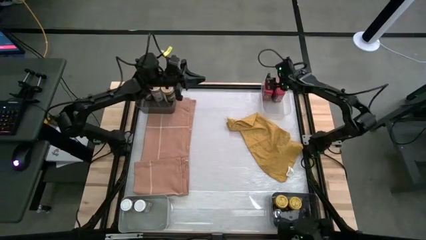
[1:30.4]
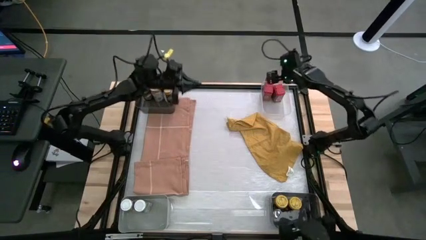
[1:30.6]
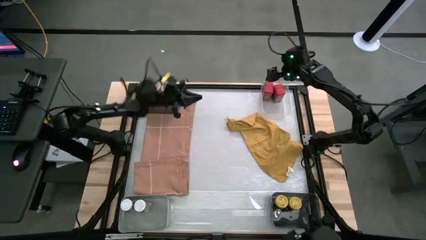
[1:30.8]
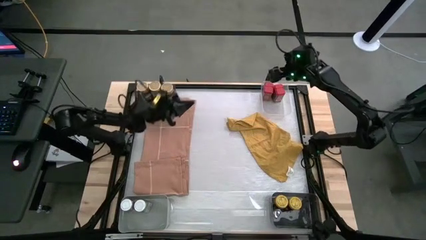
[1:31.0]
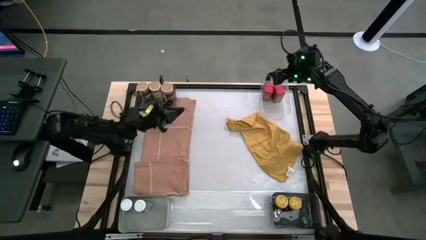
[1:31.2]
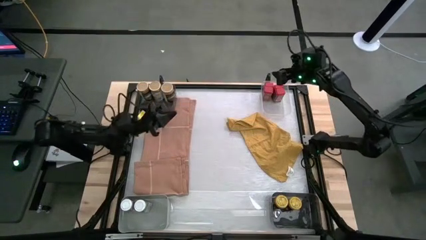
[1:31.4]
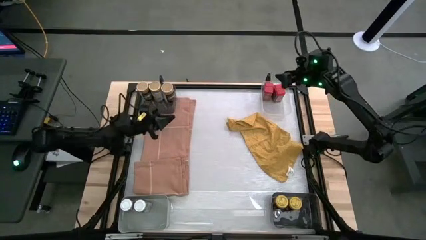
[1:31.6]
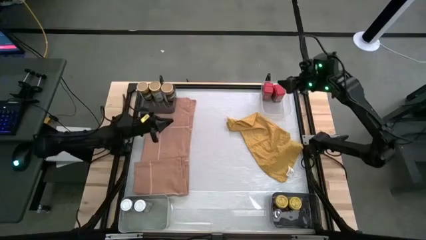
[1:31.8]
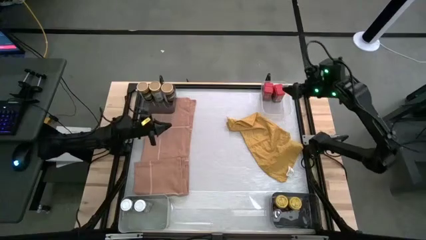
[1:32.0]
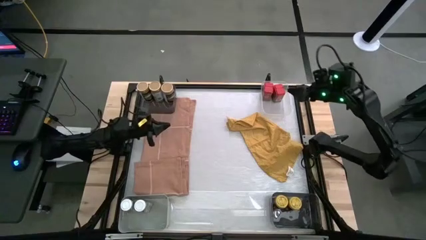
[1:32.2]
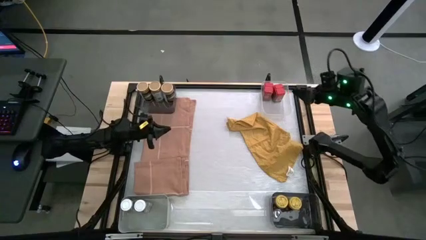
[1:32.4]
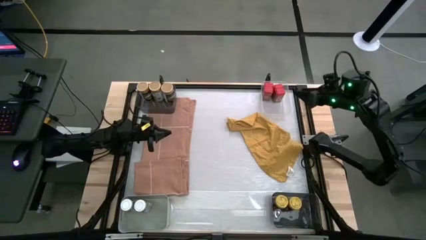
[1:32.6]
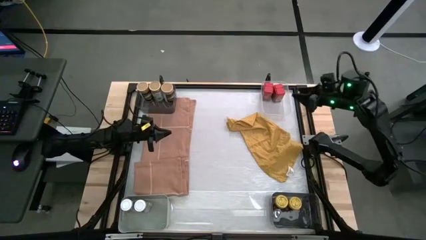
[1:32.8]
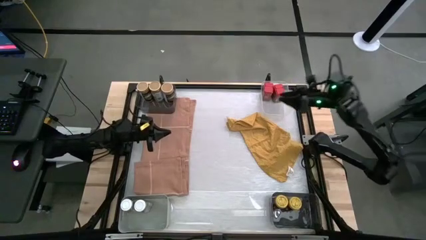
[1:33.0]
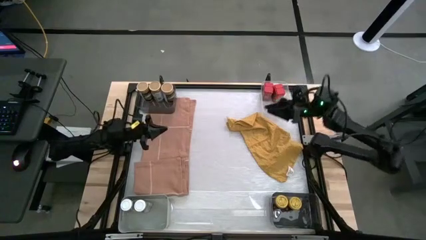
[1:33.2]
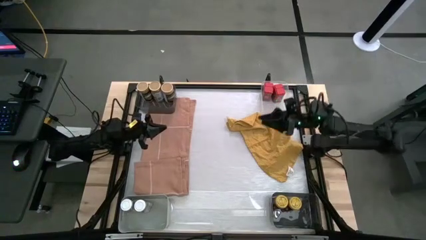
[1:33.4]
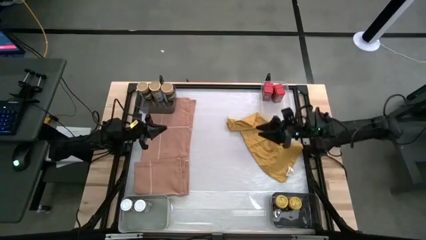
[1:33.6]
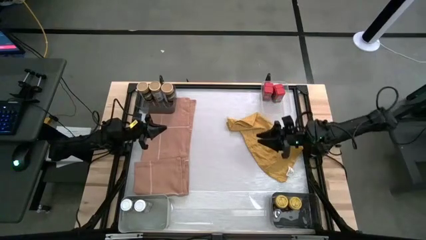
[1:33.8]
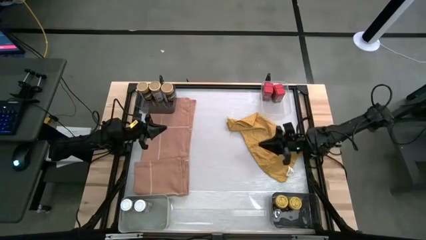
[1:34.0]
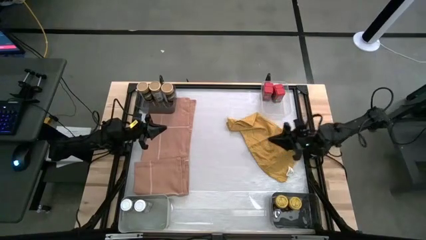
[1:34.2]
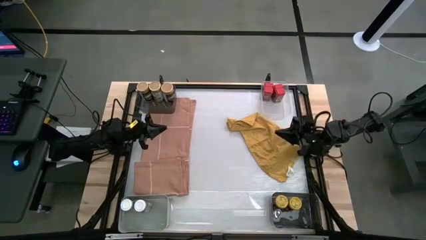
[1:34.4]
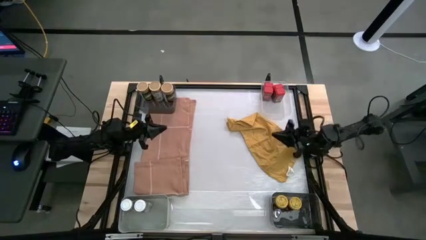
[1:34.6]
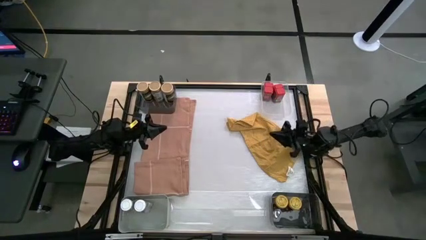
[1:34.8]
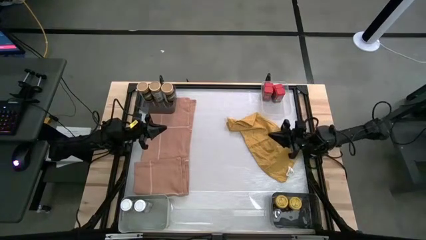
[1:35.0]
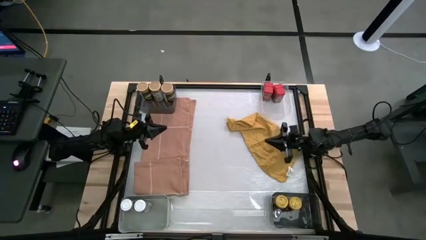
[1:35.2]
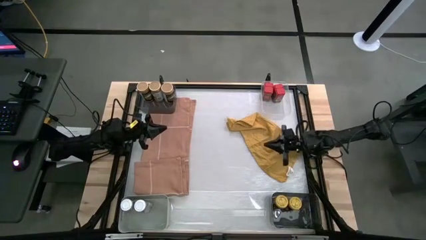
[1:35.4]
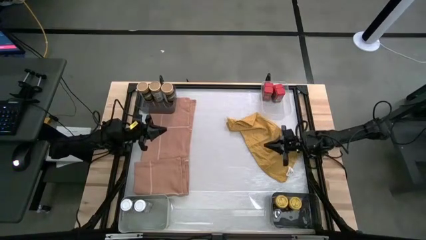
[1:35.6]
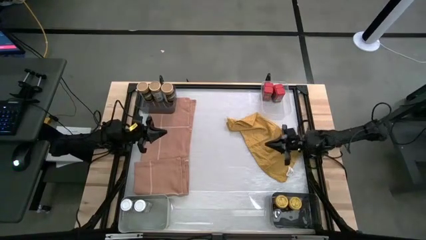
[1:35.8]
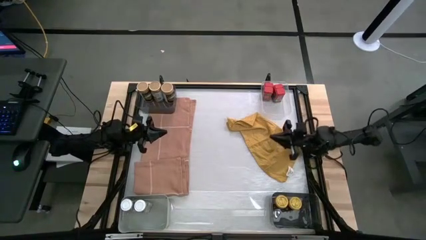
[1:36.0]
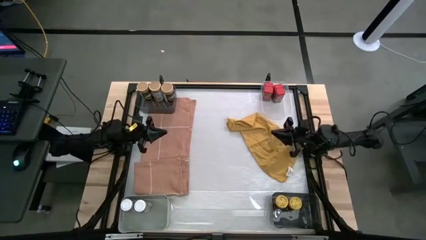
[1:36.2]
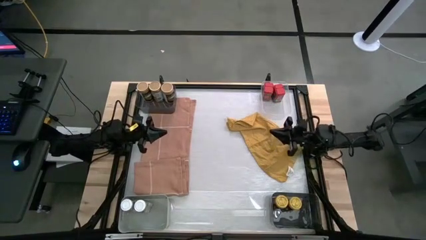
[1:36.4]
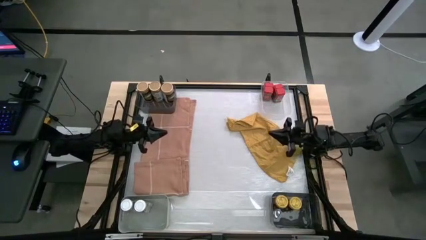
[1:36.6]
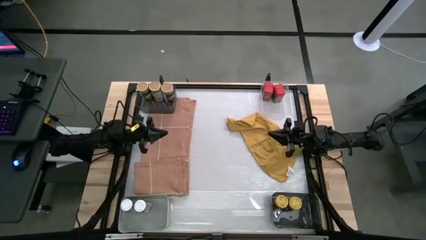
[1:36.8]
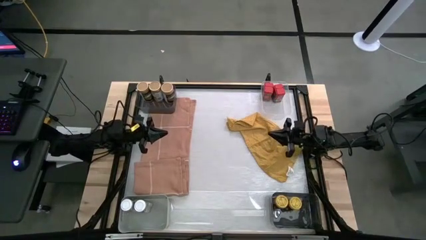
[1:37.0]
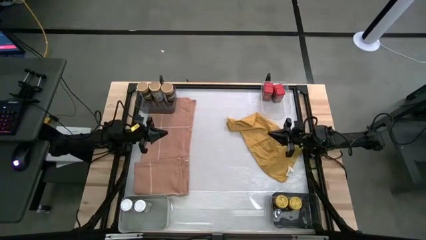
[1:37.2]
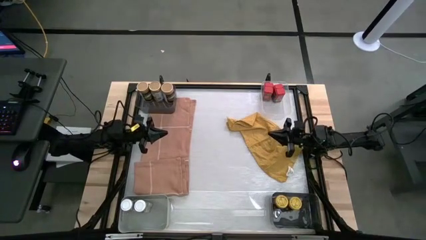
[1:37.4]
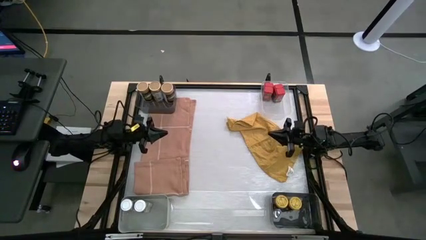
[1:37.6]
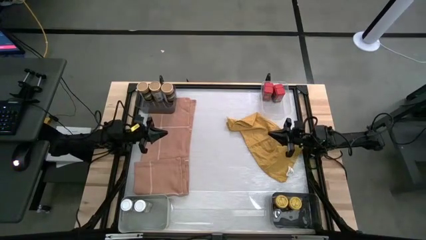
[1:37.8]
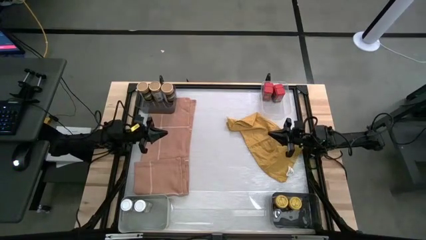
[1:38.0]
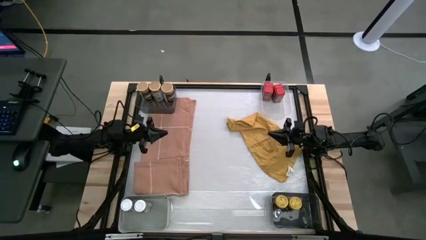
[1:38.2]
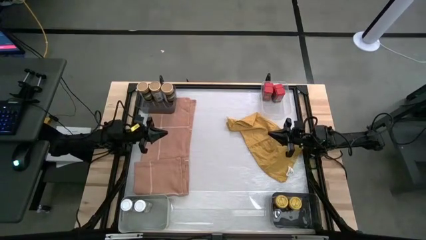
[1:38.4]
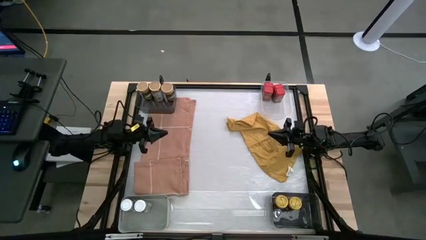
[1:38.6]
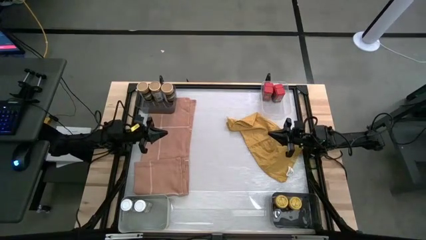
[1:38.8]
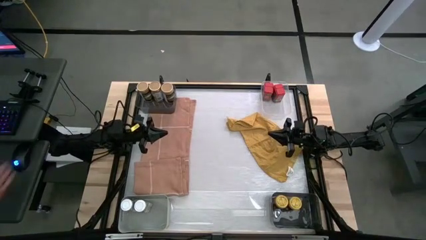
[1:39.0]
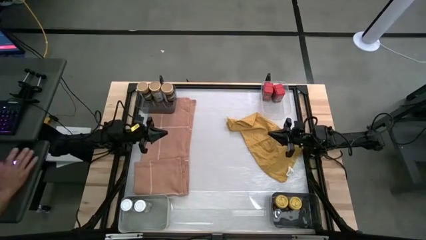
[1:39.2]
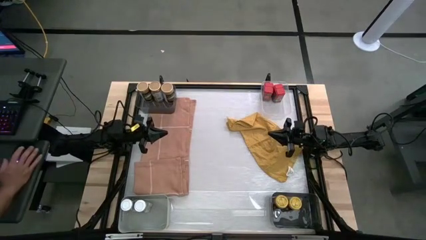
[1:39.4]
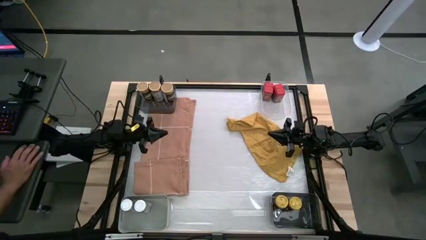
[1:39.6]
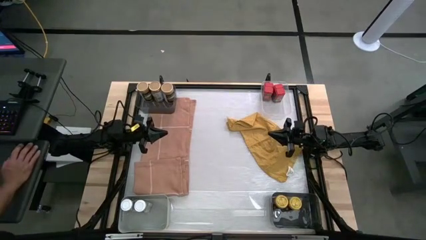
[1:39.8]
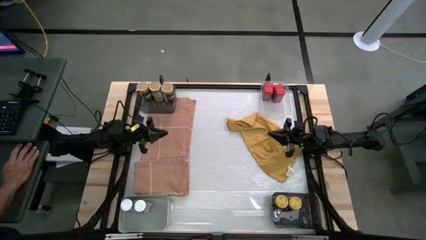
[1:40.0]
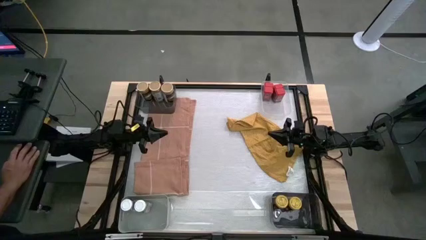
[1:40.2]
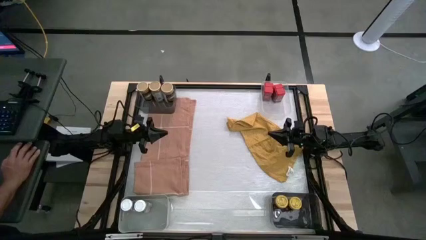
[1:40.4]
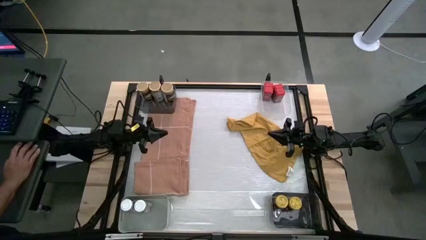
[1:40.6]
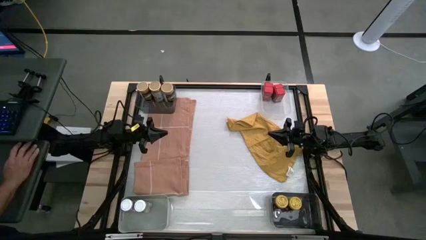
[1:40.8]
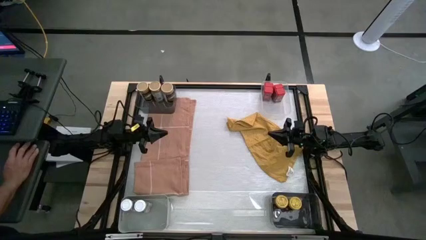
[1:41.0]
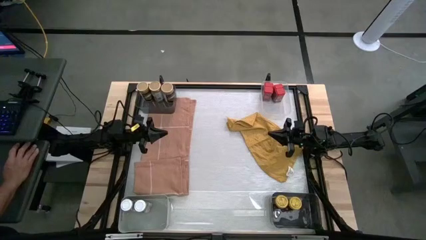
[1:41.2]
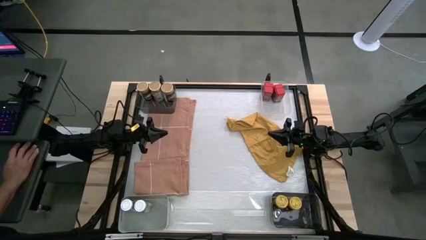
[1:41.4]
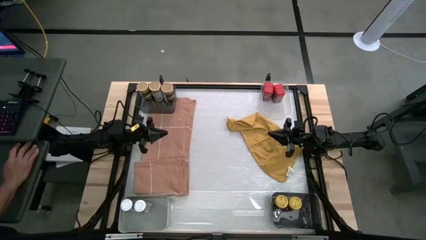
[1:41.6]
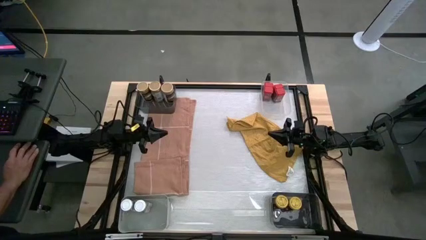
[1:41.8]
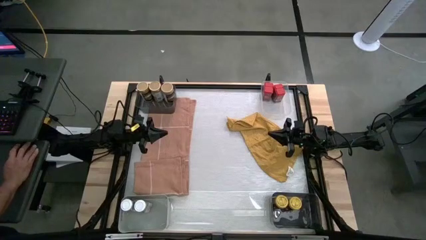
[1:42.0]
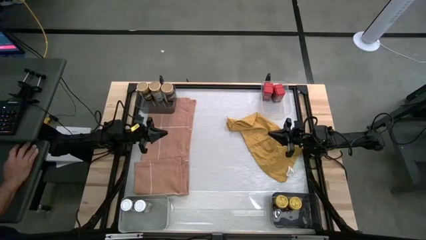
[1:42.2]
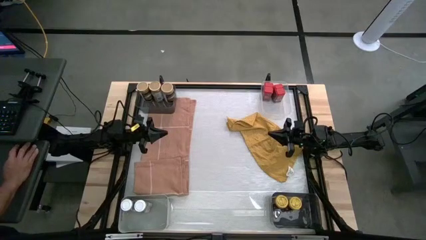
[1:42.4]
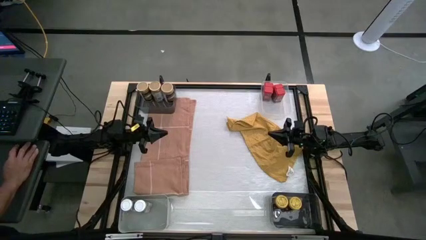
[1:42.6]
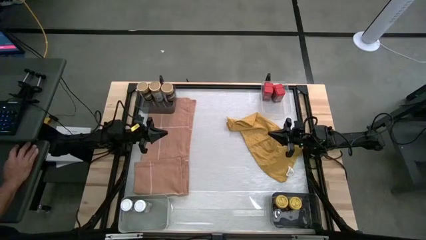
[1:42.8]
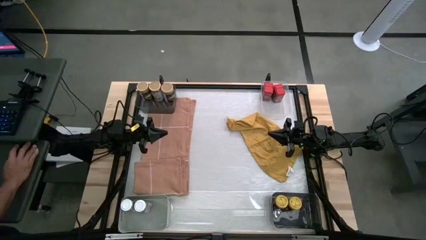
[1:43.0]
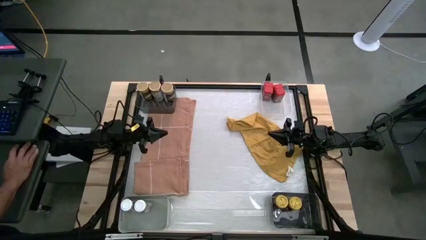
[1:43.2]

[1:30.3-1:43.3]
Task: Sort spices by type
Return to Home Position

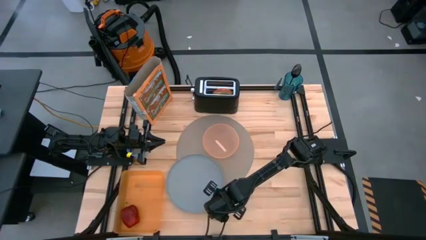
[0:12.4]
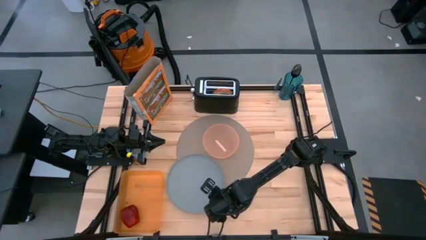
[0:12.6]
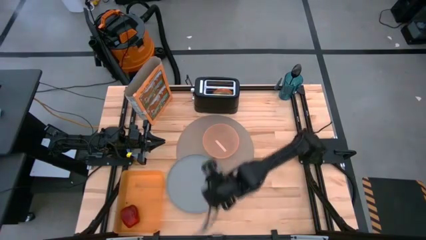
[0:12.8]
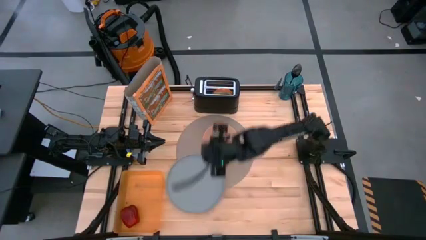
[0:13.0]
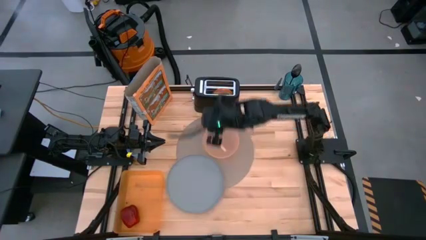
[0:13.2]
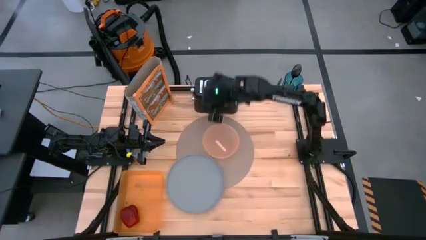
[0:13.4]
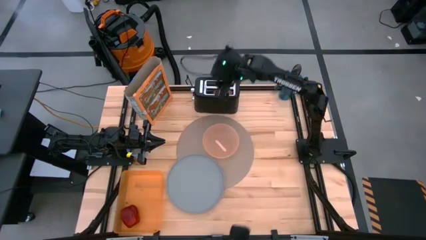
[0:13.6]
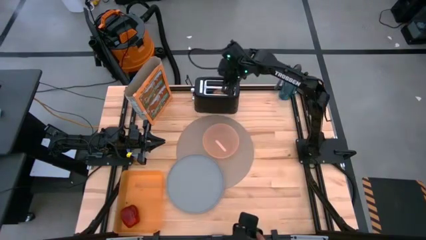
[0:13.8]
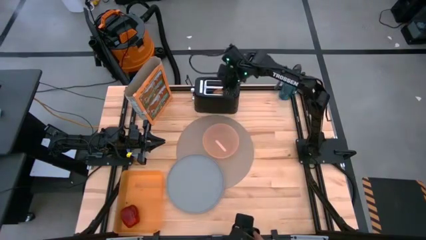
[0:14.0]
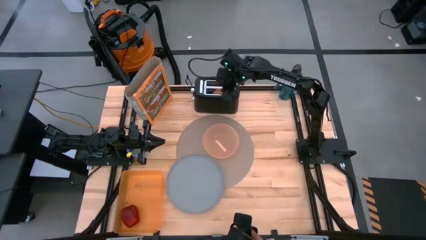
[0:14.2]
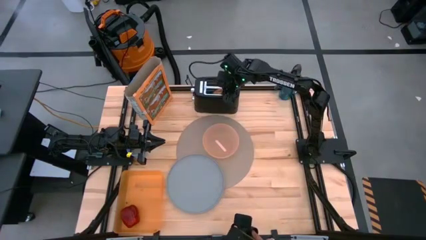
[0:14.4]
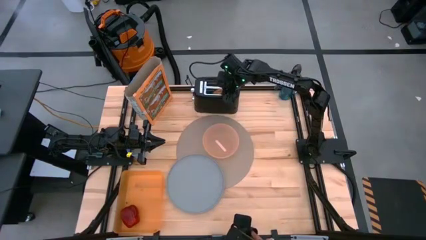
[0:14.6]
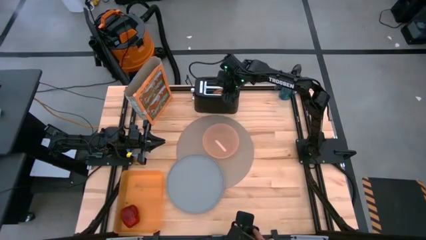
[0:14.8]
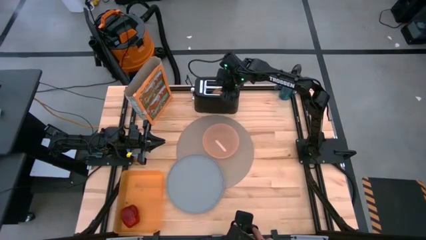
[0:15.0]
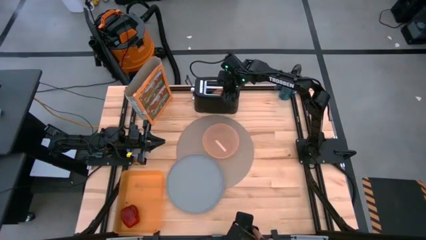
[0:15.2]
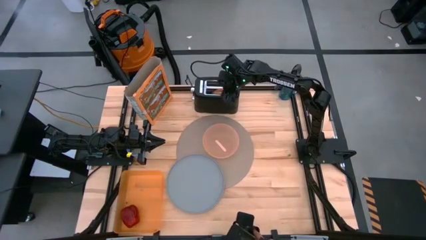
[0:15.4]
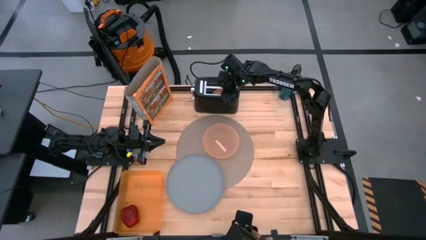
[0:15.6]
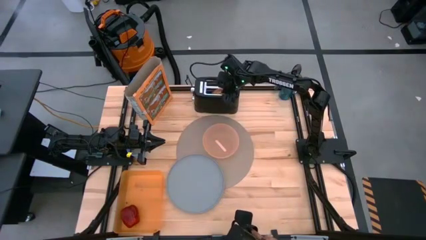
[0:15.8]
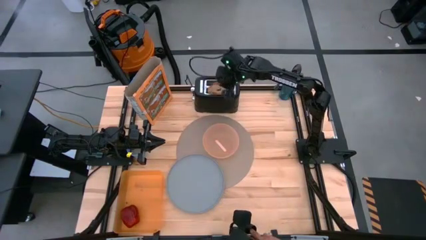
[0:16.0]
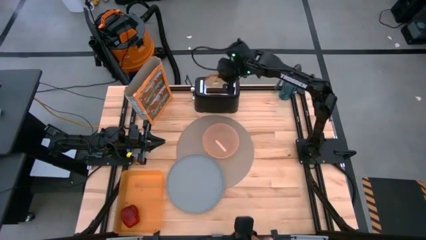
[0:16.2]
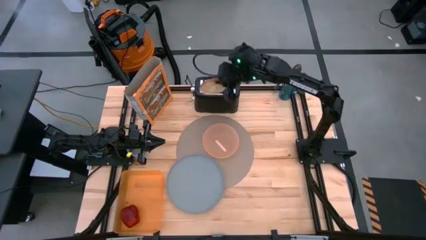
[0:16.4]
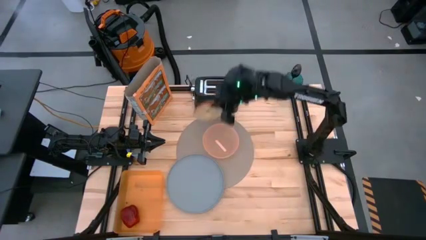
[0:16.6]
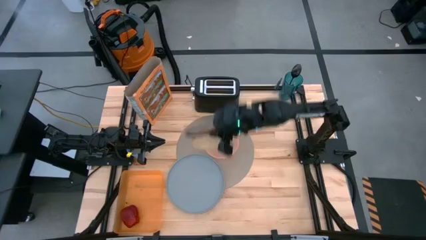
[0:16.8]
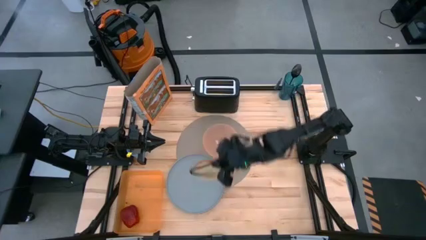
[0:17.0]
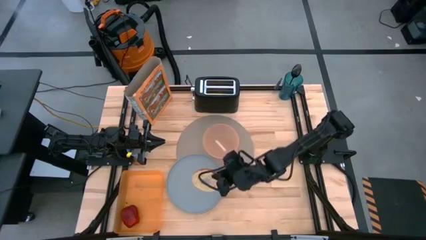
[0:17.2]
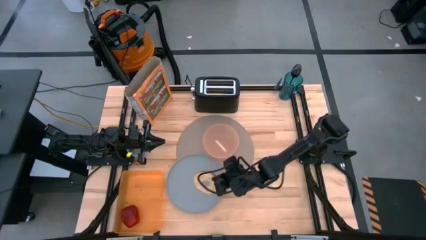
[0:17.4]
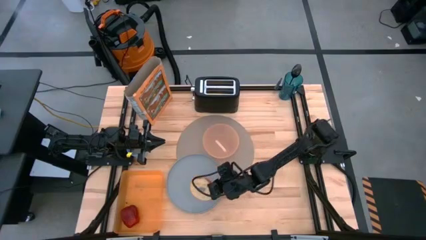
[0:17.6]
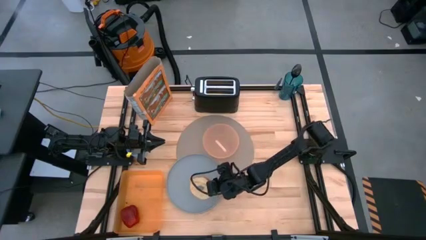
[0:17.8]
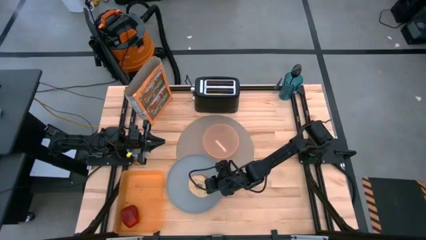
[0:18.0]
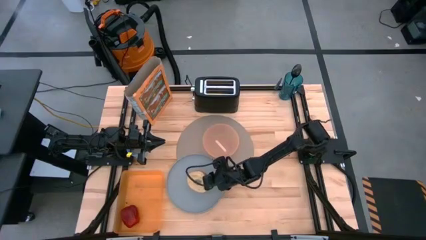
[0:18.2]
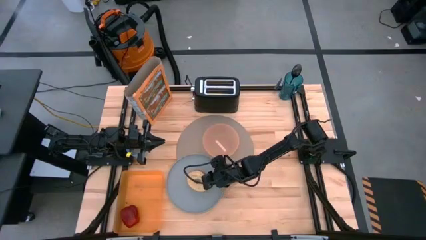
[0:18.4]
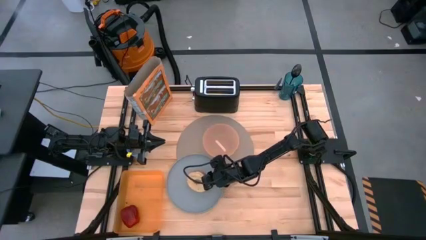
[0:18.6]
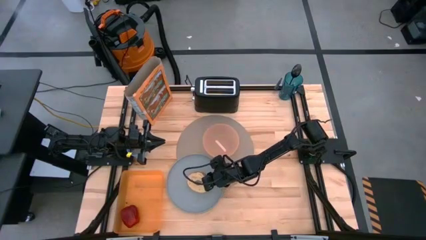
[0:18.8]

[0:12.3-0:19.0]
Task: Arrange a breakfast setting
Put the bagel on the gray plate
